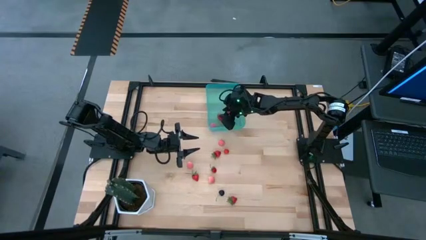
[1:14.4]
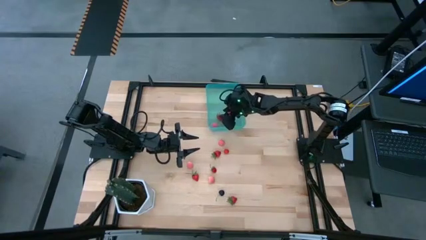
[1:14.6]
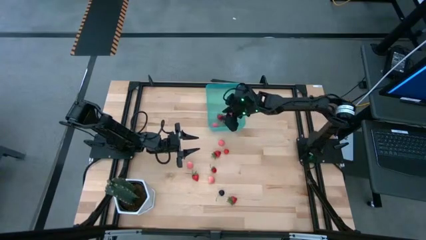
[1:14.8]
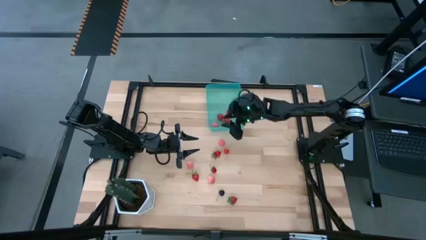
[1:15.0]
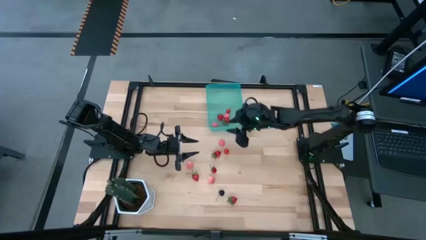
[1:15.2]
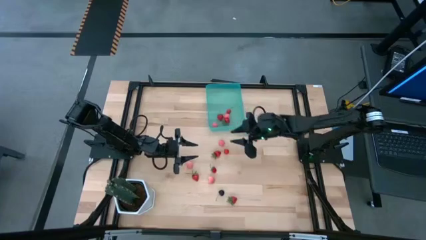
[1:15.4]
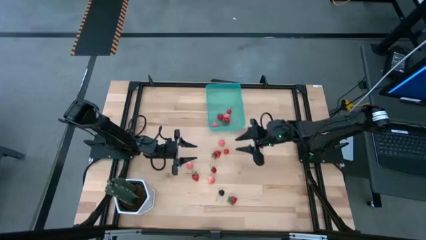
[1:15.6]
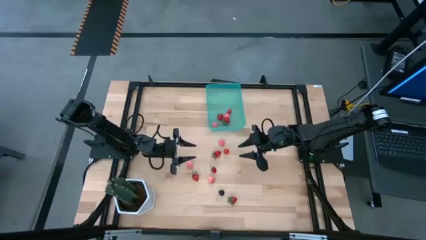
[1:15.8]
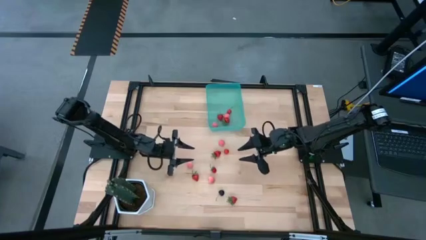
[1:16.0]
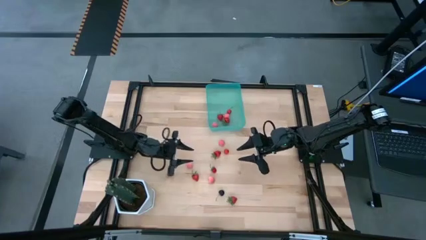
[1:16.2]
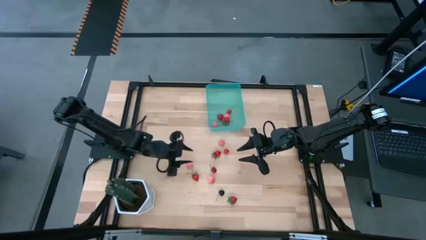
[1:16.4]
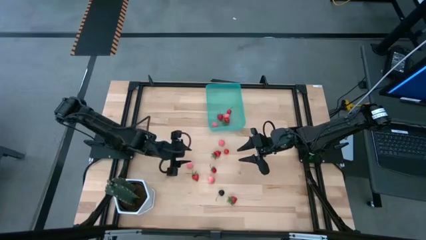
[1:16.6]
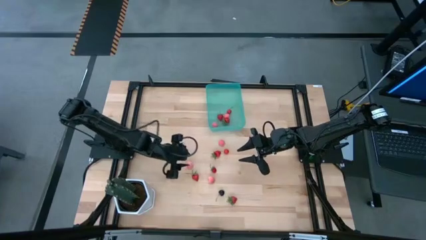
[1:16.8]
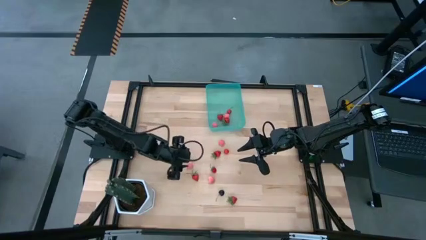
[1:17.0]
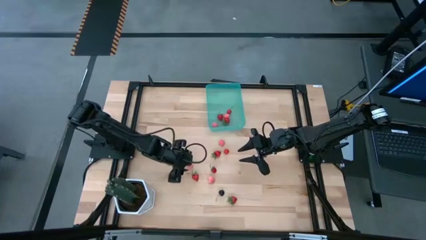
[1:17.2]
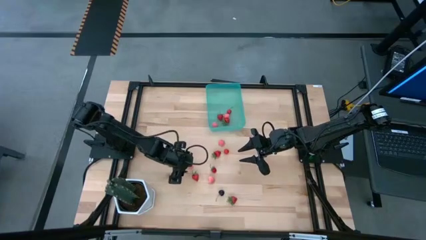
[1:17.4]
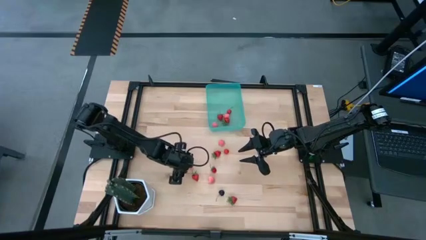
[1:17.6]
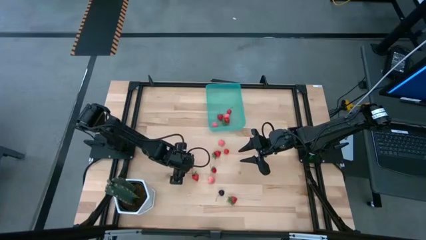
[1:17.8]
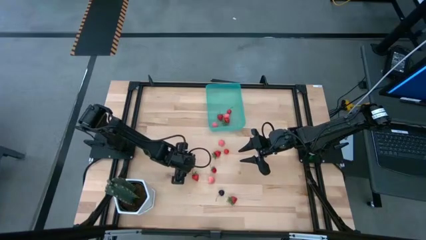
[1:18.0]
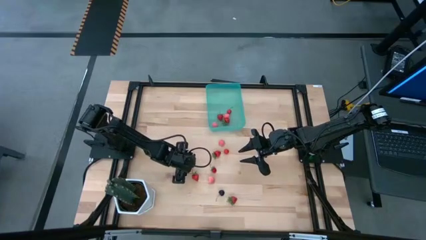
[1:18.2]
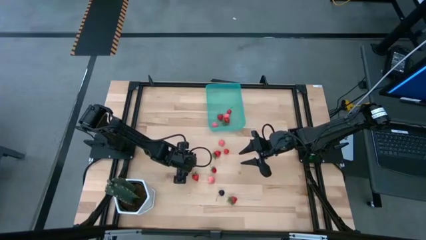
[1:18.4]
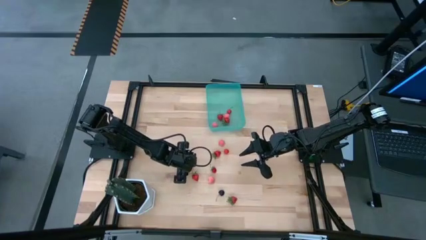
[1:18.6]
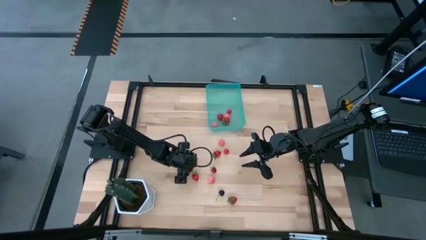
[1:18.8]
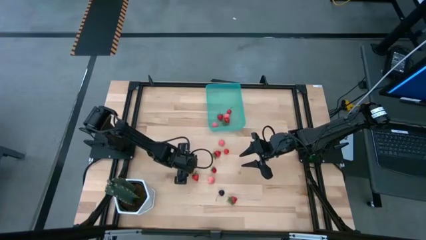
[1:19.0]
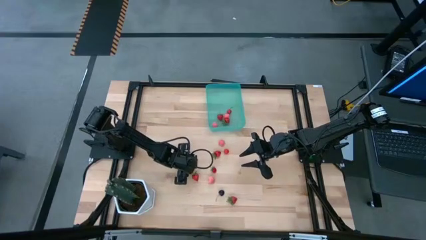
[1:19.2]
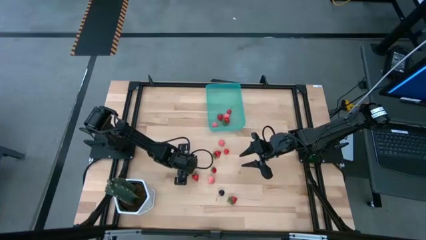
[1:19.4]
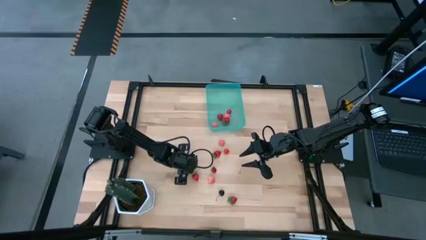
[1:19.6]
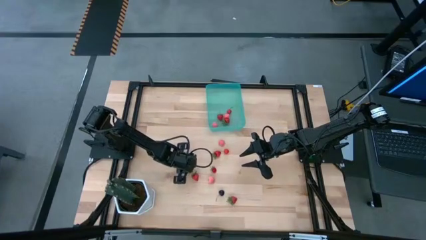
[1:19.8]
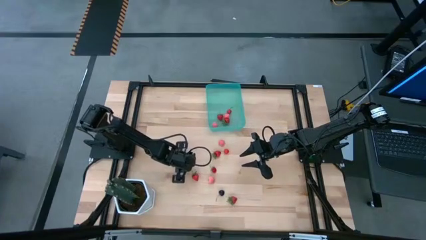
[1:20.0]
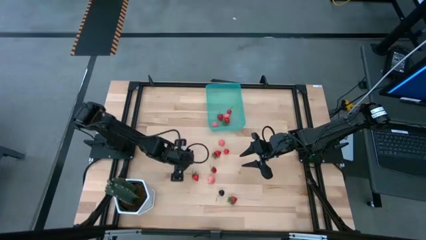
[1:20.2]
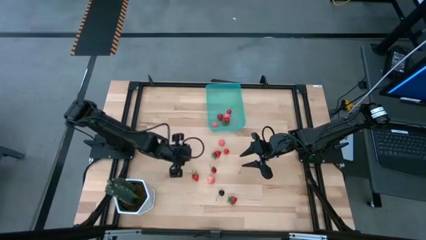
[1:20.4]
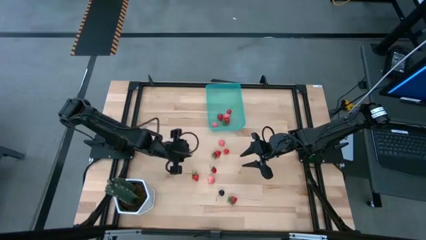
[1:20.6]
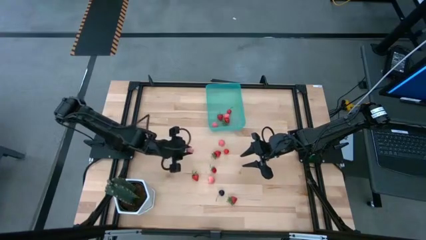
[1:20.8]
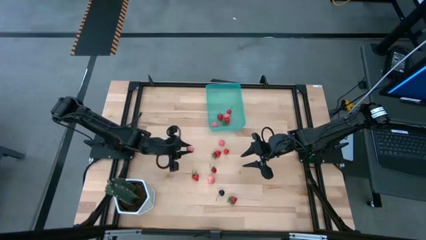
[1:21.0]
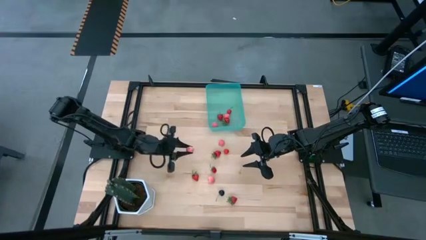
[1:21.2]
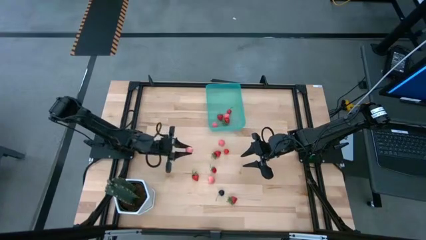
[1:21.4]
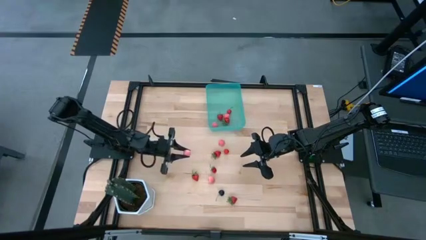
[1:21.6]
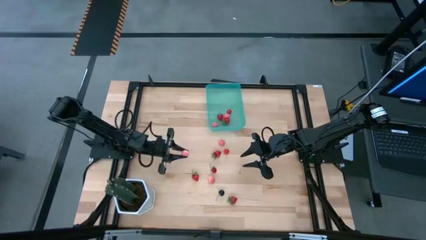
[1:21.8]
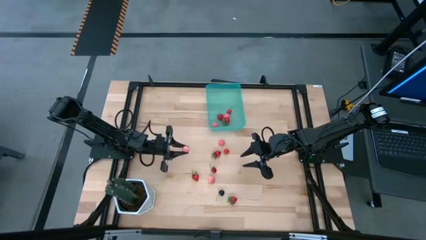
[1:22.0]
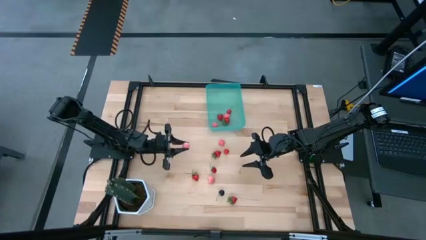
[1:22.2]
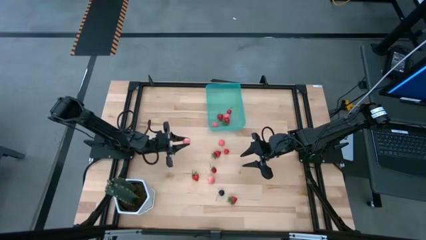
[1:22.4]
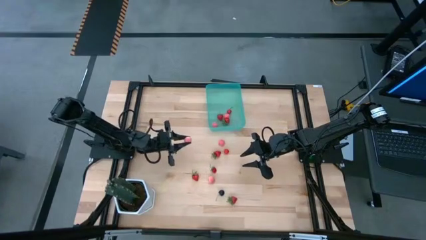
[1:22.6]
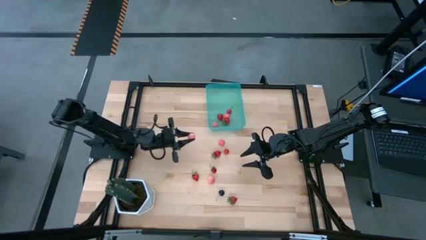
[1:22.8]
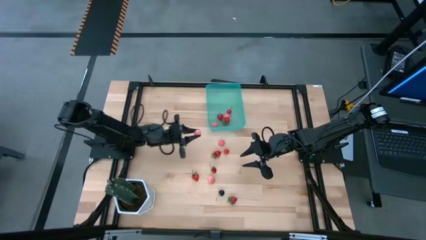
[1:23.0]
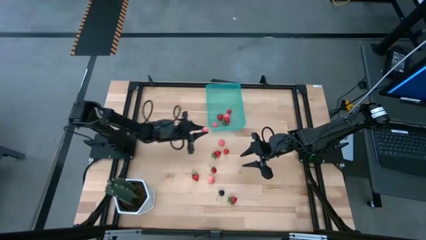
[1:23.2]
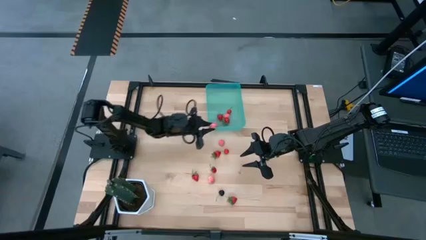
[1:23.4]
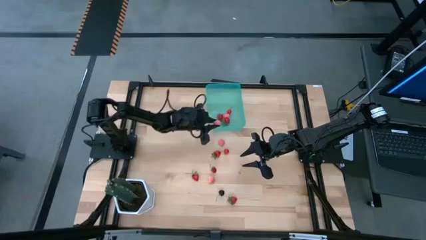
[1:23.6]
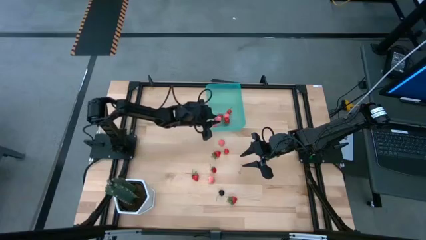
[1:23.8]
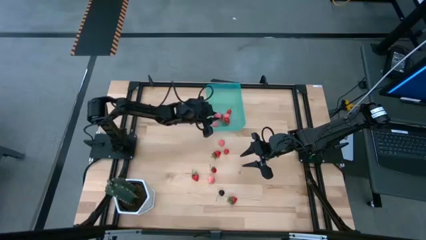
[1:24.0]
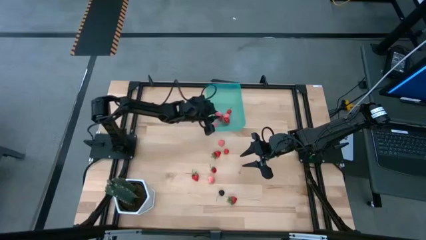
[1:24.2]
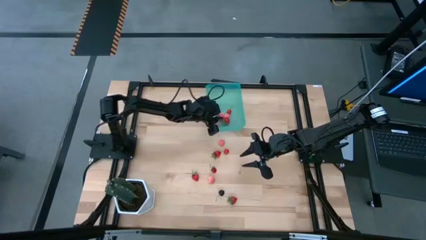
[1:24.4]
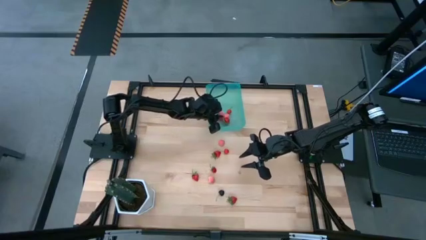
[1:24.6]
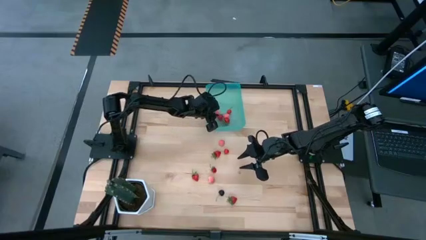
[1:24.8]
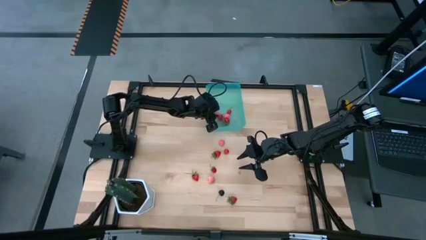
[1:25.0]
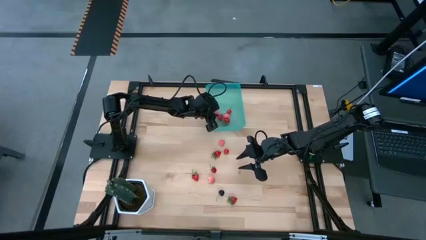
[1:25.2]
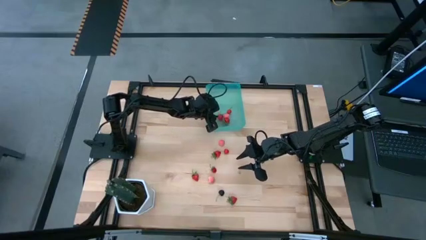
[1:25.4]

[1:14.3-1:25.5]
Task: Pick and placing Produce into tupperware
Put the pink peach into the blue bin

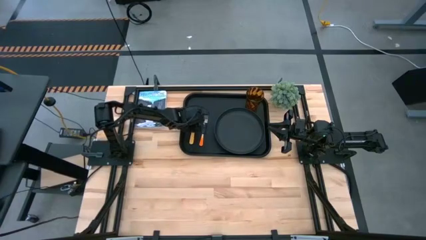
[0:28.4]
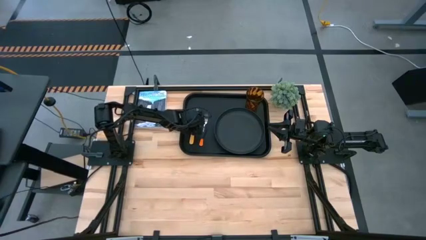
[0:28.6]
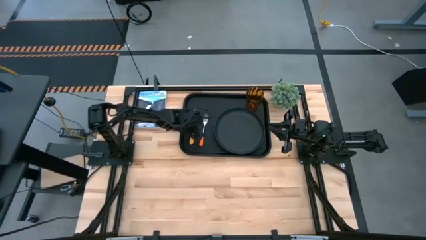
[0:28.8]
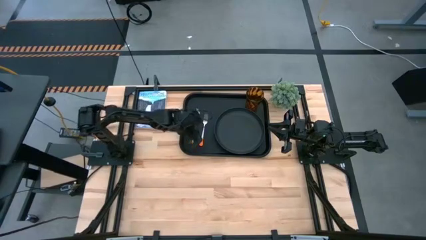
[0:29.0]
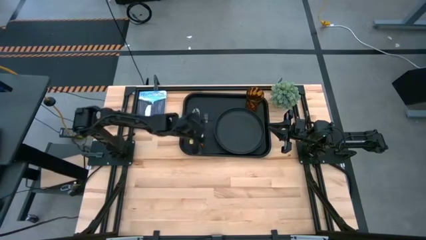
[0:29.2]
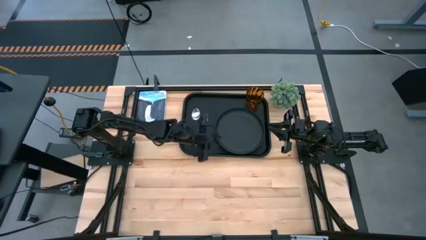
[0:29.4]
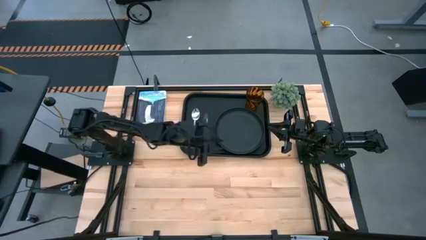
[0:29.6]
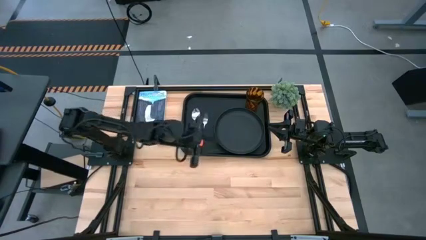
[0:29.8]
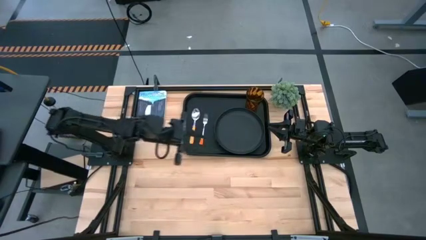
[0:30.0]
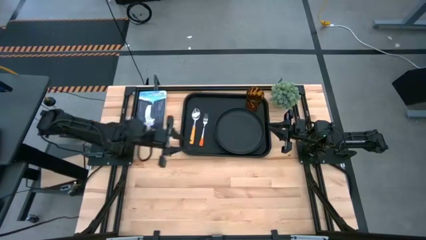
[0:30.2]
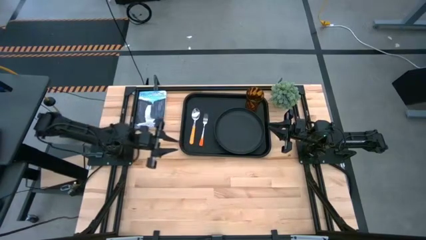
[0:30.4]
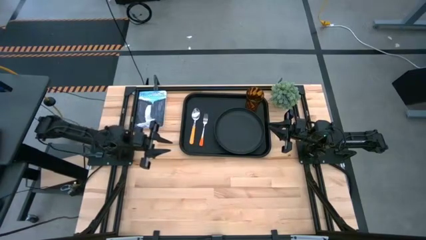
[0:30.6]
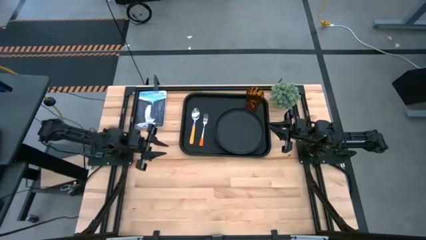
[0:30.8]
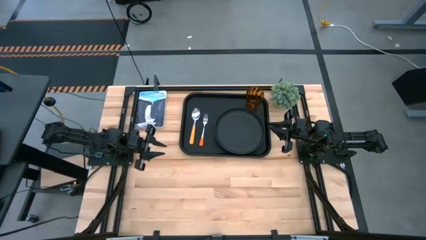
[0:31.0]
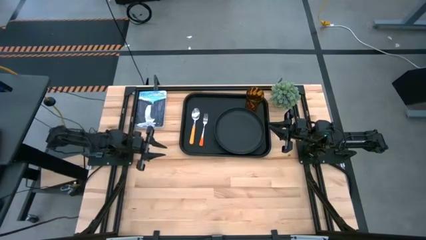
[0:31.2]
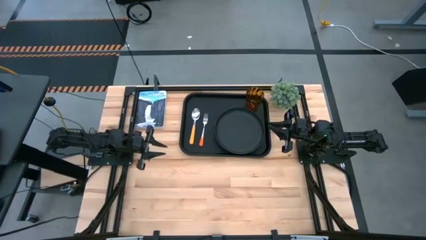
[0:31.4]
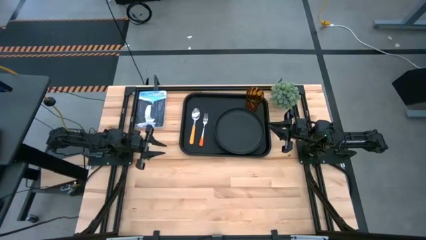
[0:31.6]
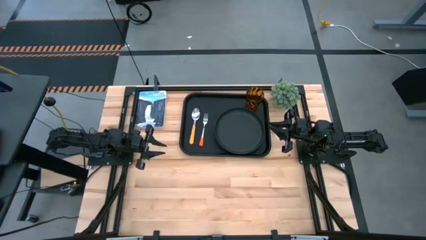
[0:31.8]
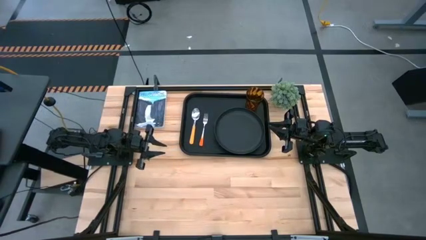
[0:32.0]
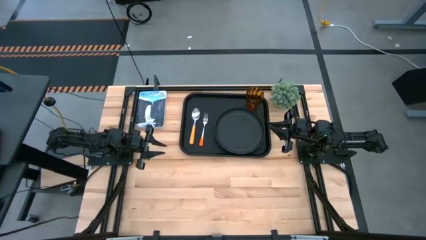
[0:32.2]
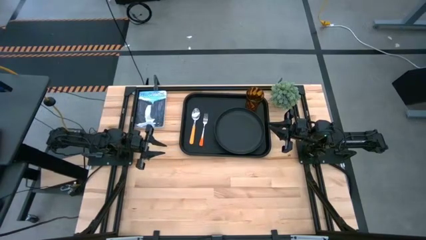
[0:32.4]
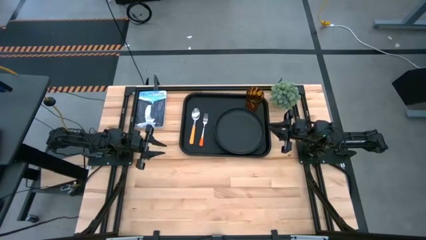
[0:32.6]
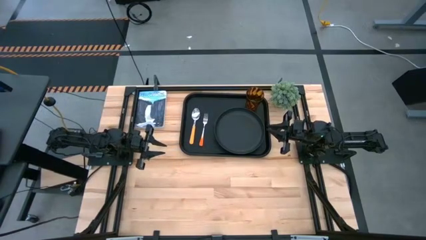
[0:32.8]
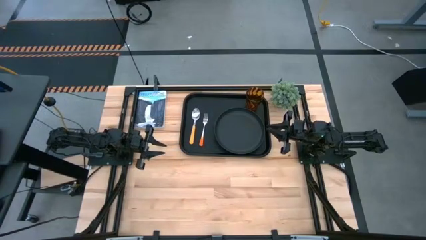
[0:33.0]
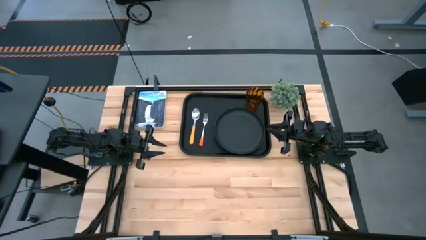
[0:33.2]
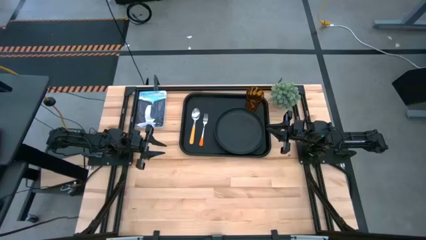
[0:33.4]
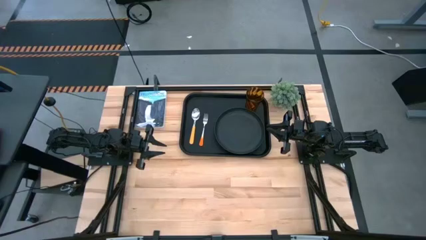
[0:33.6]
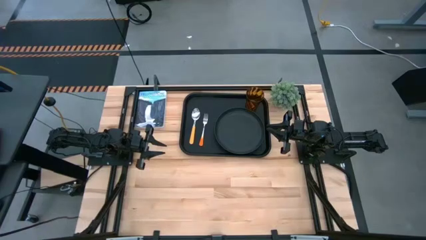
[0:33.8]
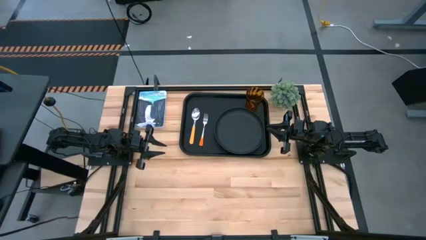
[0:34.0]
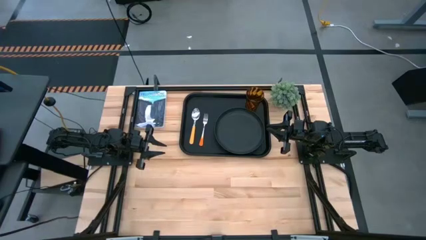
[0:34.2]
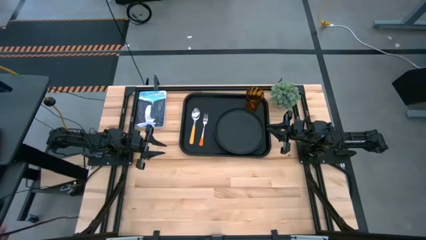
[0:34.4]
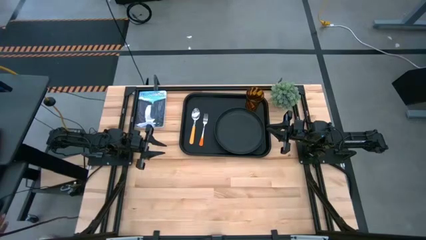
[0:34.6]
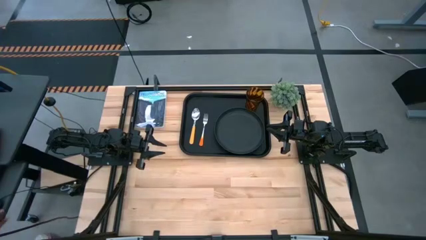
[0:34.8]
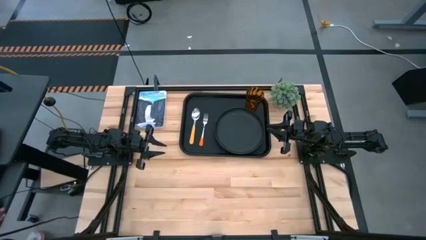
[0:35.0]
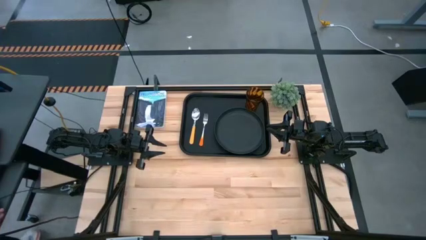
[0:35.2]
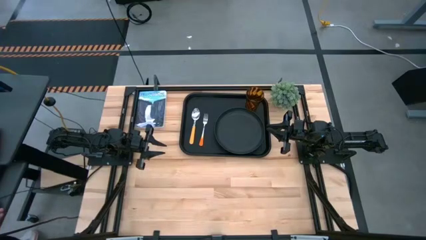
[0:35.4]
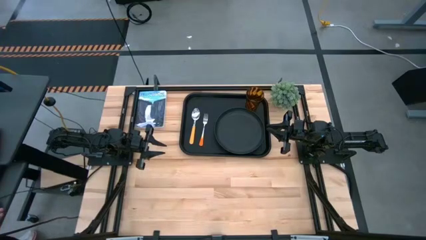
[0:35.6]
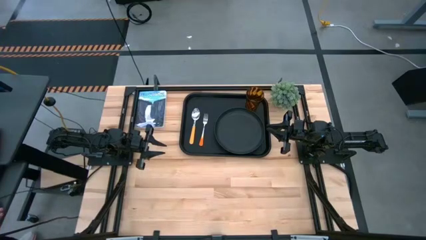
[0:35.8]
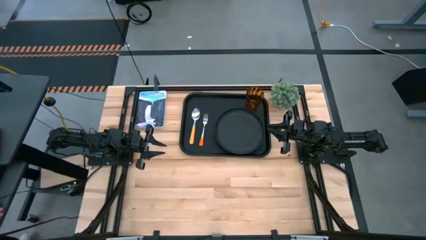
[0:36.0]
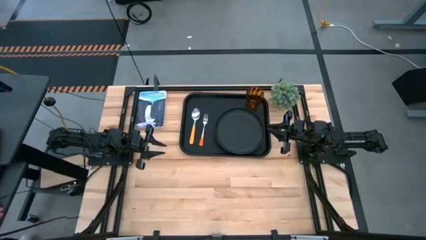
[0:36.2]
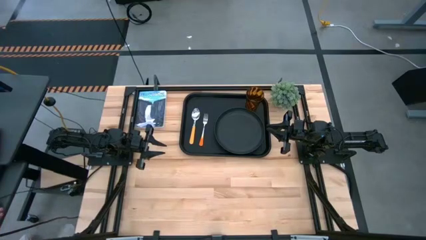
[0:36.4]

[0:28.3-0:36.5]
Task: Pick and place plate/cup/fork/spoon on tray
Return to Home Position
